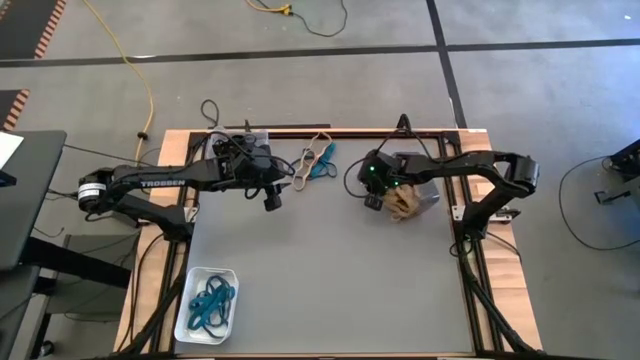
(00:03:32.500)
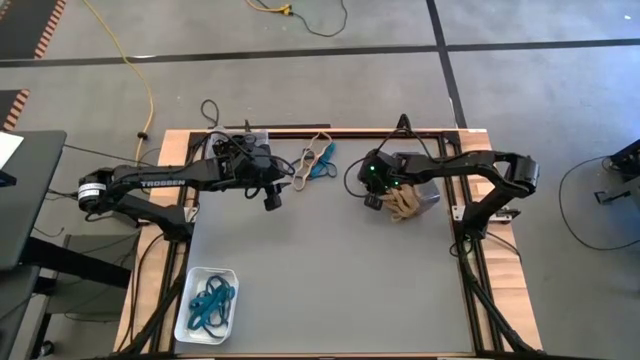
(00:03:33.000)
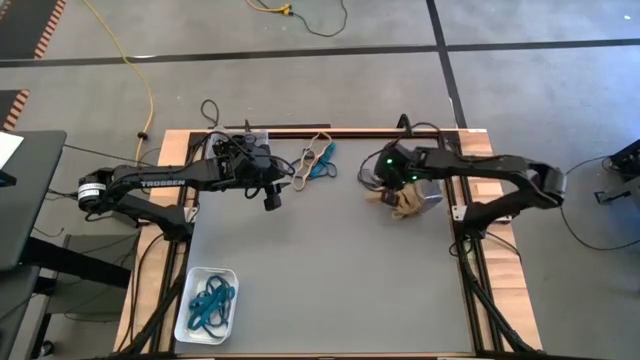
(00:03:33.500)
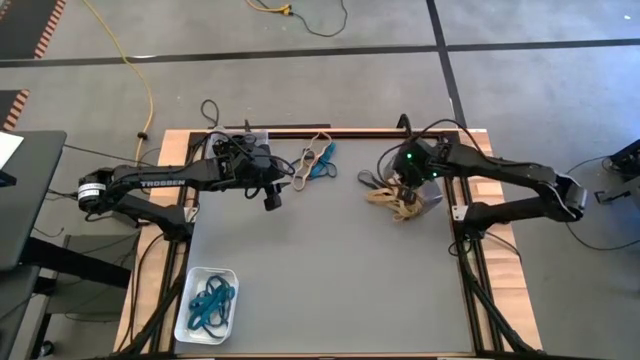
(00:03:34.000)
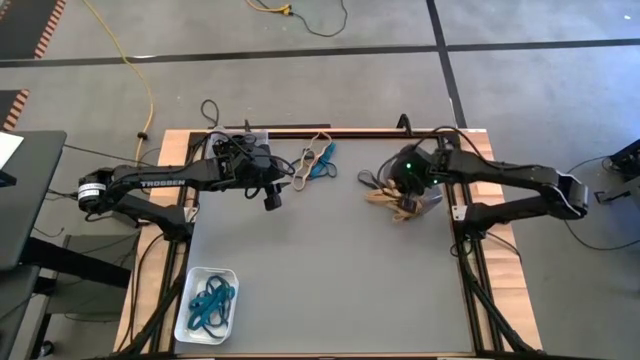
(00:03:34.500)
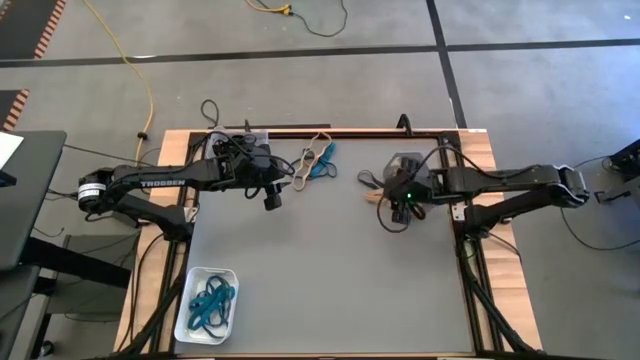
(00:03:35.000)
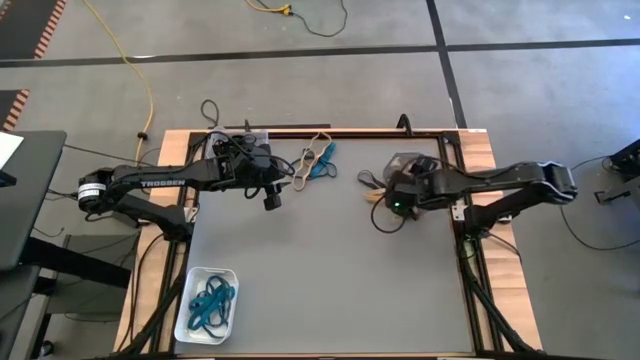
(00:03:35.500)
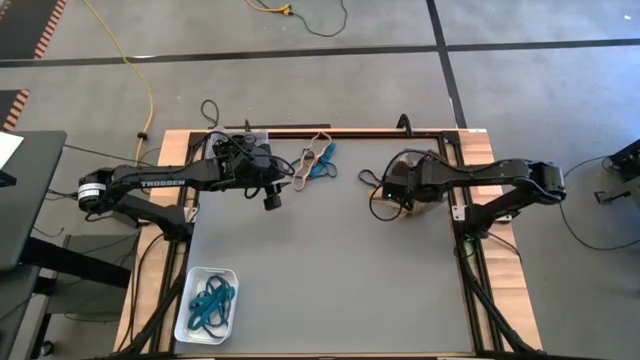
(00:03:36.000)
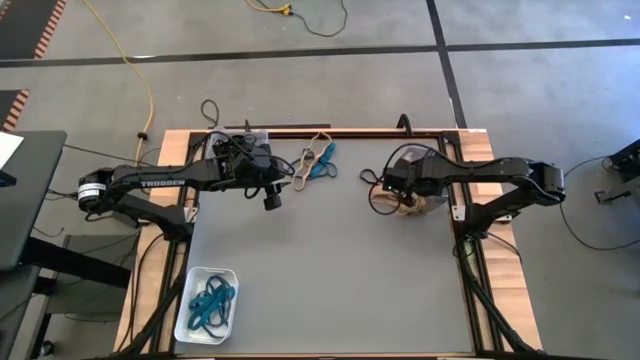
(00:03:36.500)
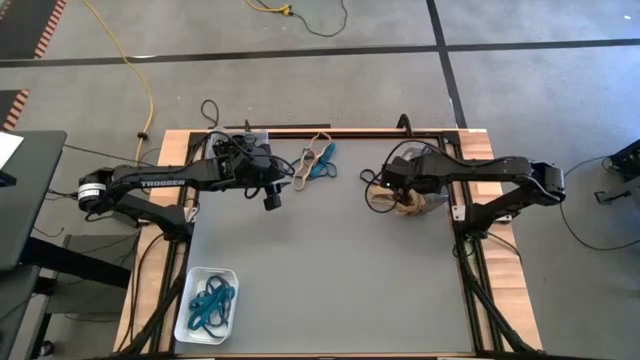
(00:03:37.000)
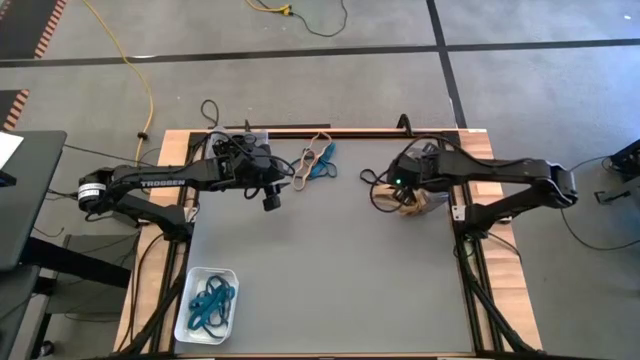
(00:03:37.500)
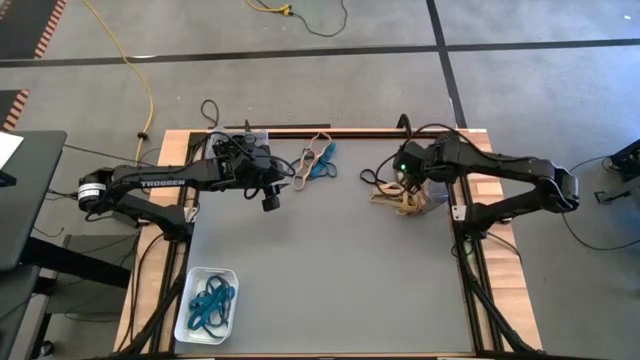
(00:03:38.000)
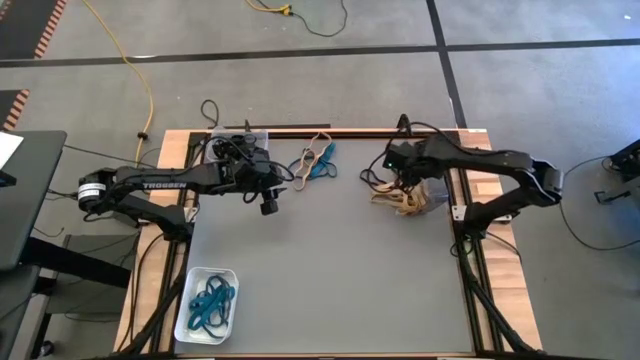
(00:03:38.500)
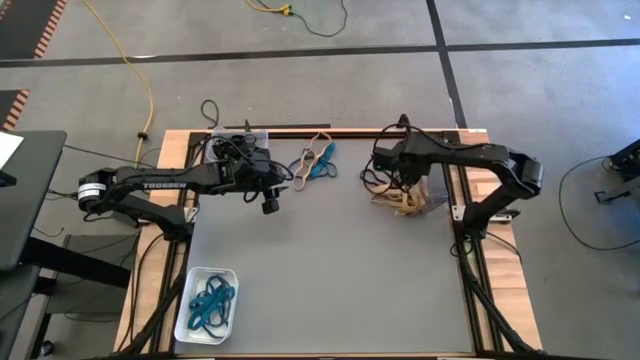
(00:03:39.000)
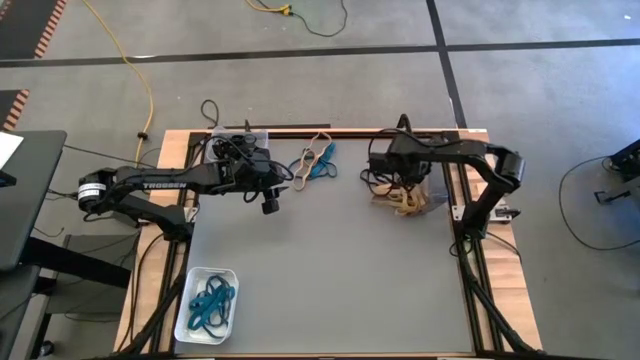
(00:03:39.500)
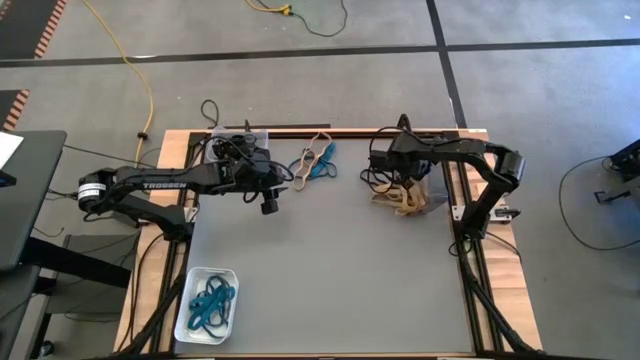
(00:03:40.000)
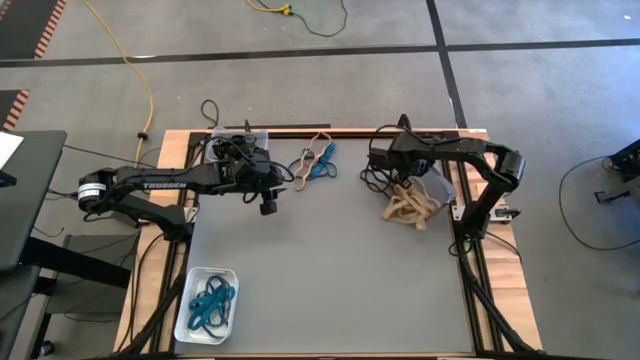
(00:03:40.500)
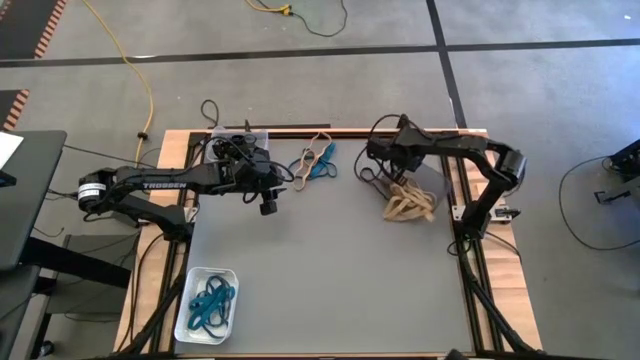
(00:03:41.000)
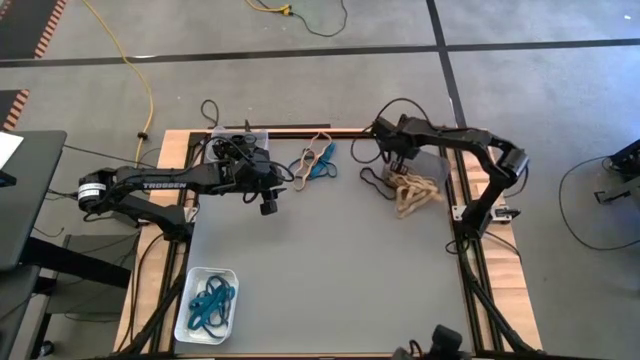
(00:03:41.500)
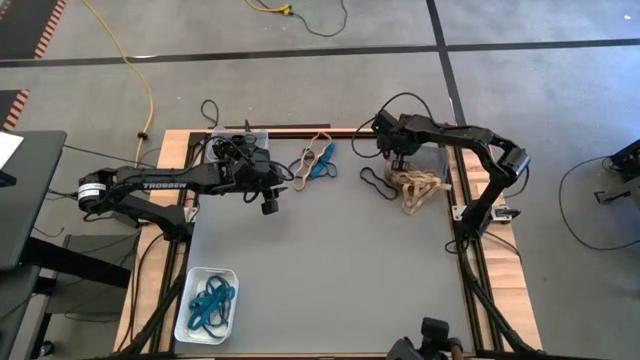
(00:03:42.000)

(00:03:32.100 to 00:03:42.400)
Task: Sort rubber bands into baskets
Adjust the black transparent bin to the top right of the table

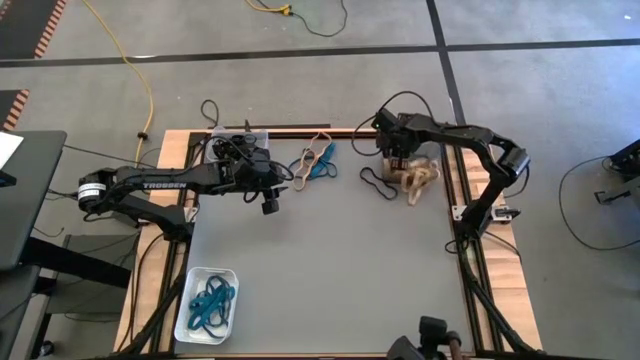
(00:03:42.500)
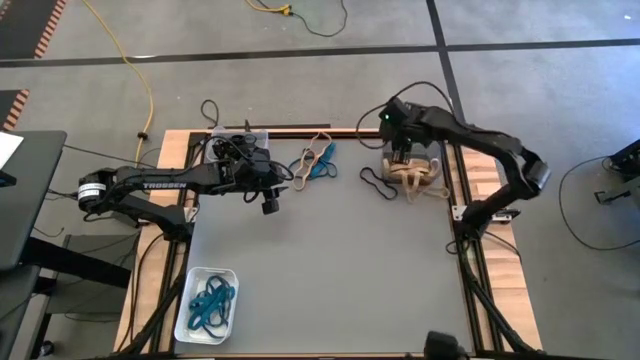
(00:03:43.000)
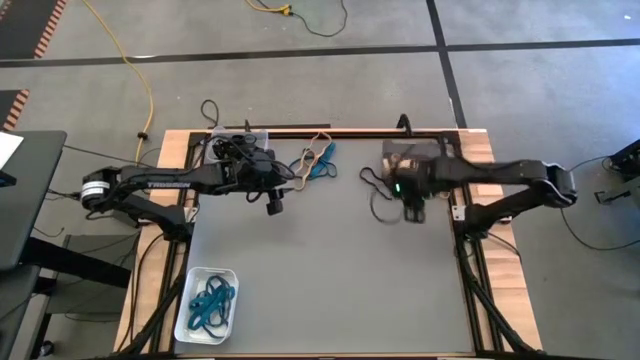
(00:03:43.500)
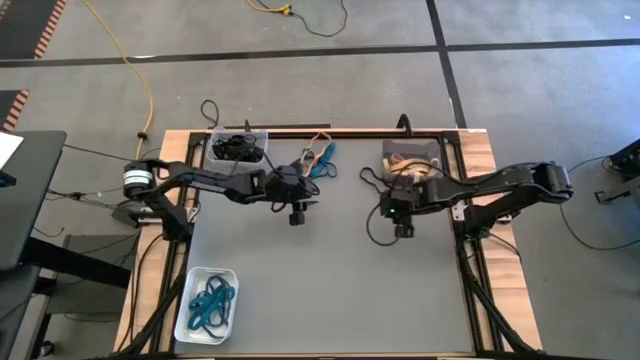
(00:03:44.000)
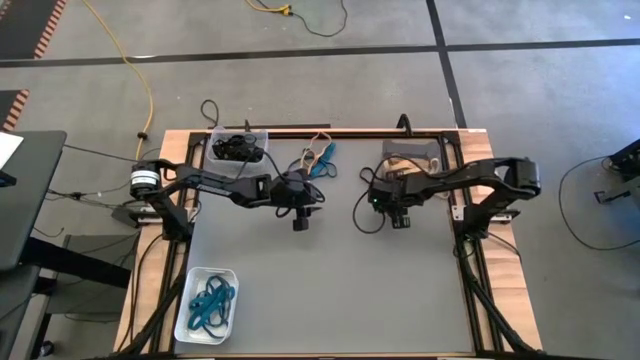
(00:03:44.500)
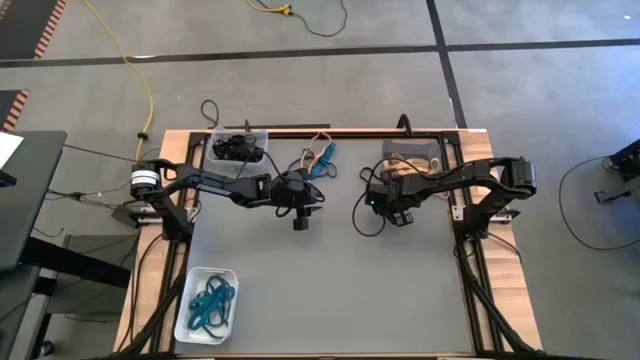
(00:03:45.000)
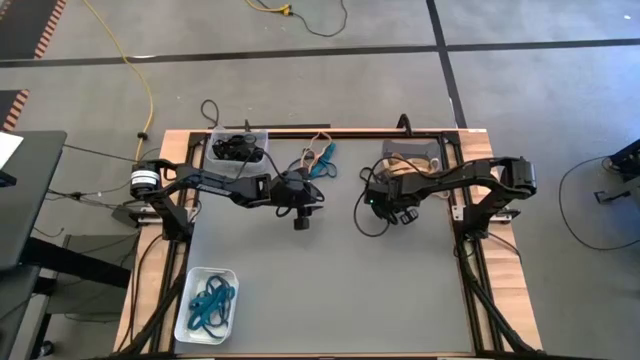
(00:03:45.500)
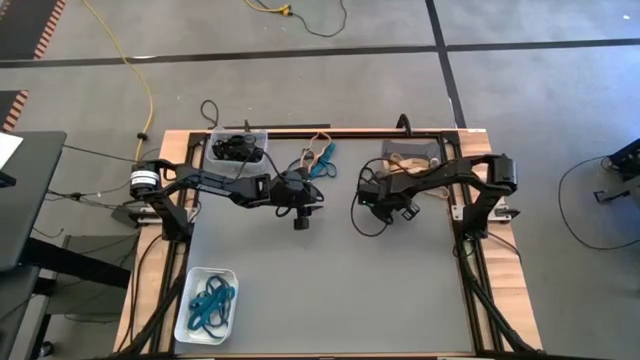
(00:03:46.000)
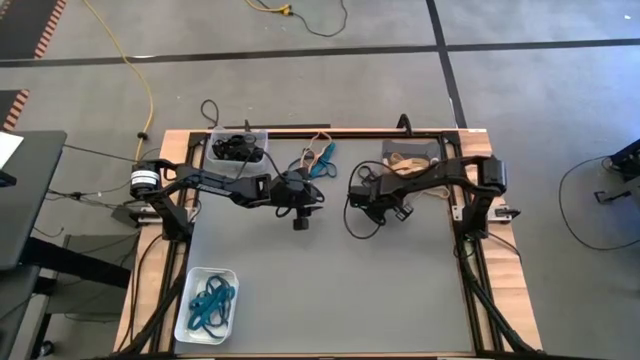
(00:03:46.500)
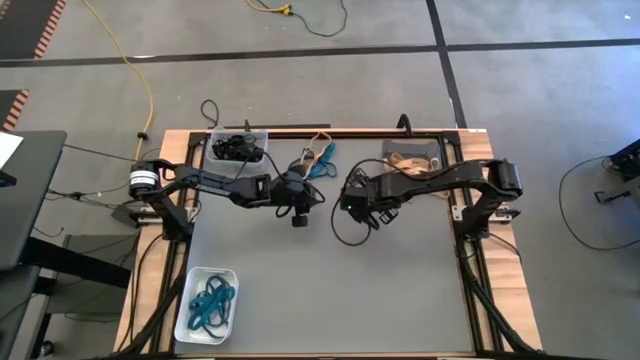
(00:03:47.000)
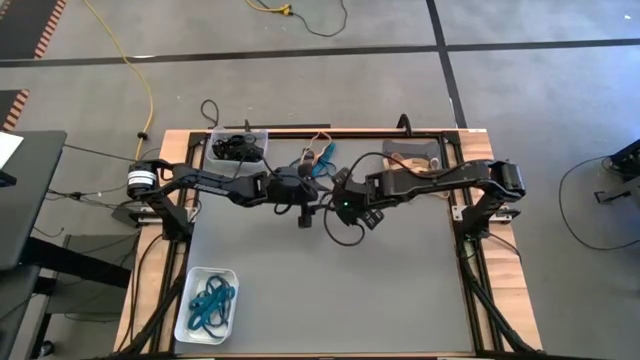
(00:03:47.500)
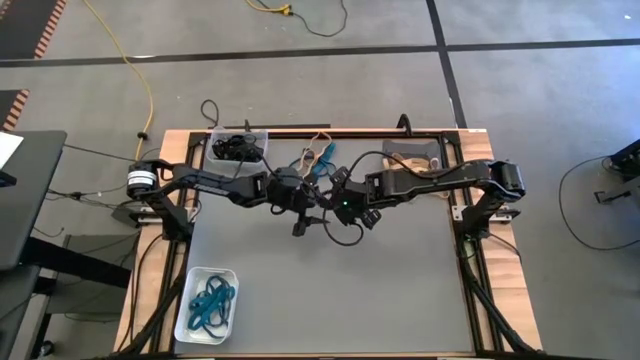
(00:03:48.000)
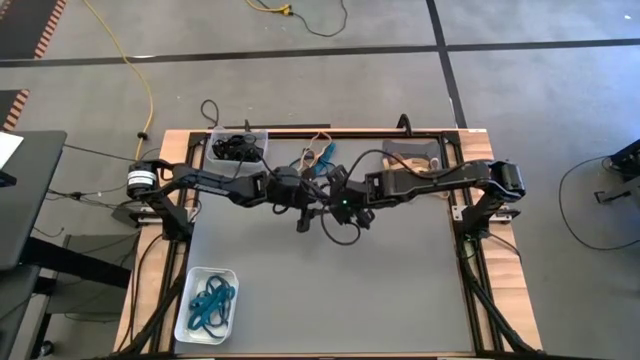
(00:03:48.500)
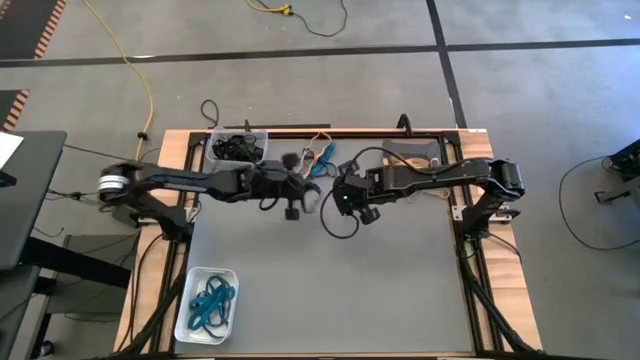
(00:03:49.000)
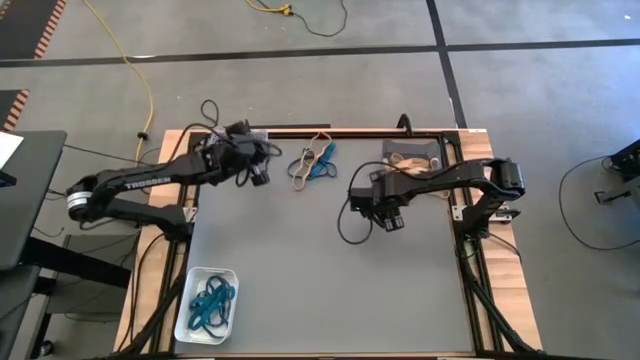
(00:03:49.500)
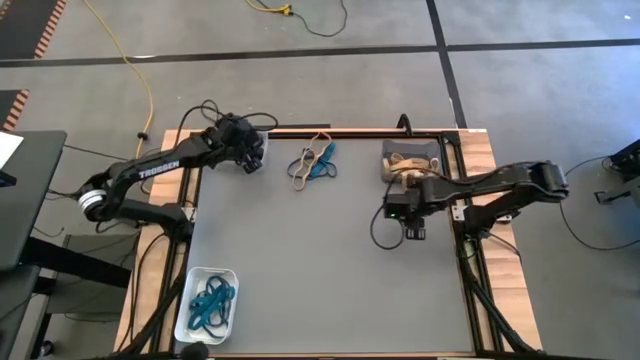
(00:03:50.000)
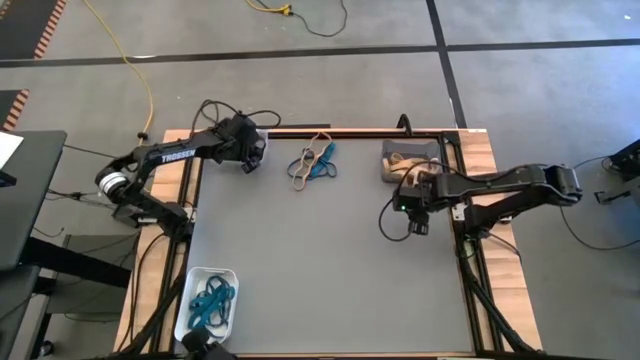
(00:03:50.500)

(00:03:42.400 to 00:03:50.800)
Put the black rubber band into the transparent bin
